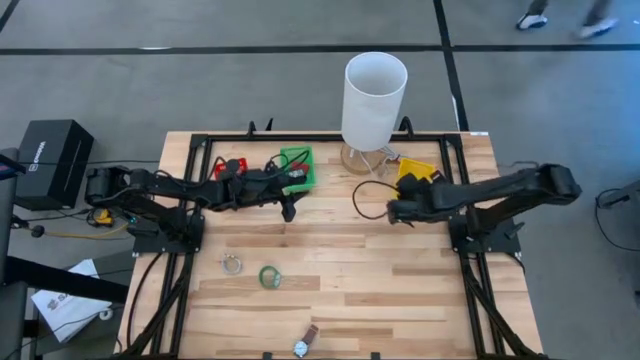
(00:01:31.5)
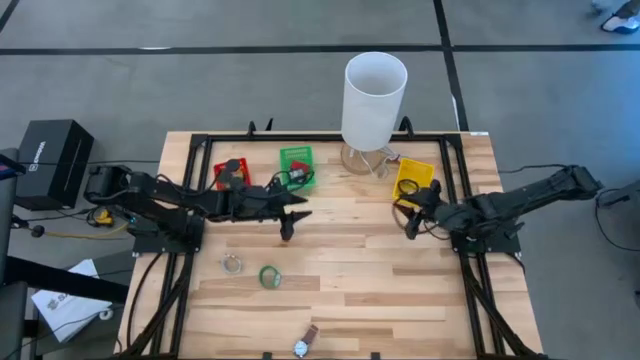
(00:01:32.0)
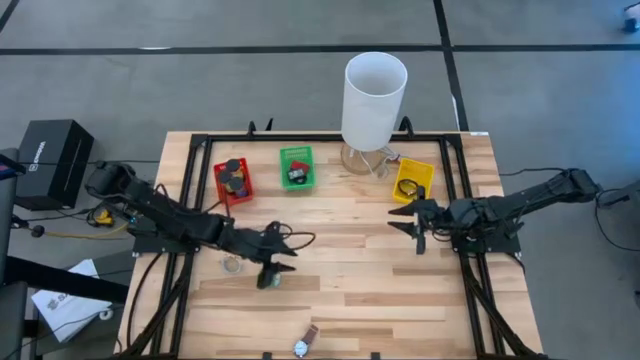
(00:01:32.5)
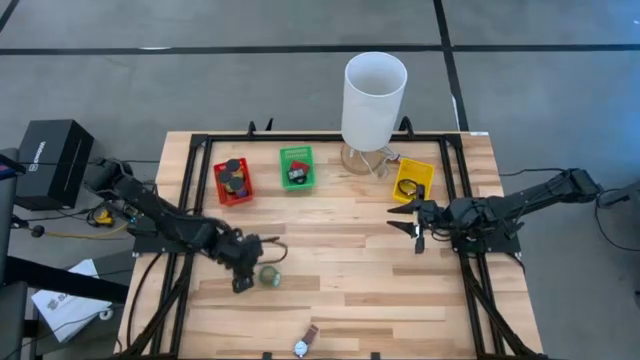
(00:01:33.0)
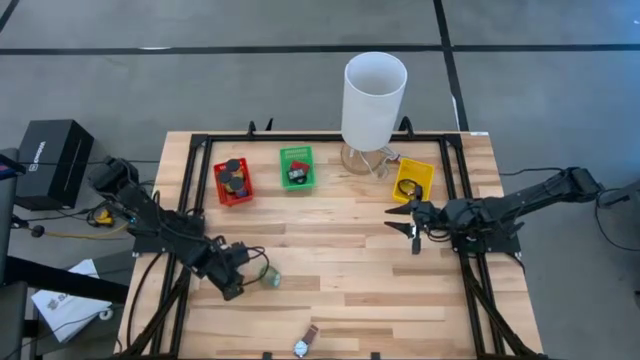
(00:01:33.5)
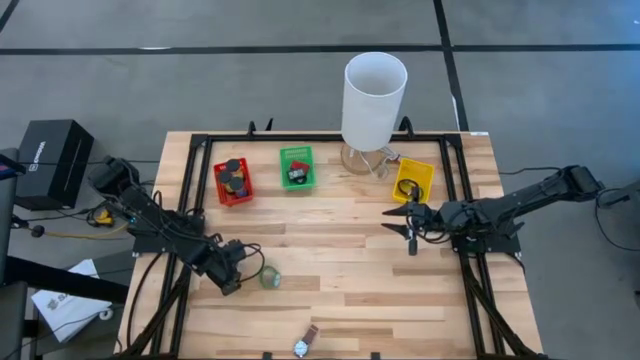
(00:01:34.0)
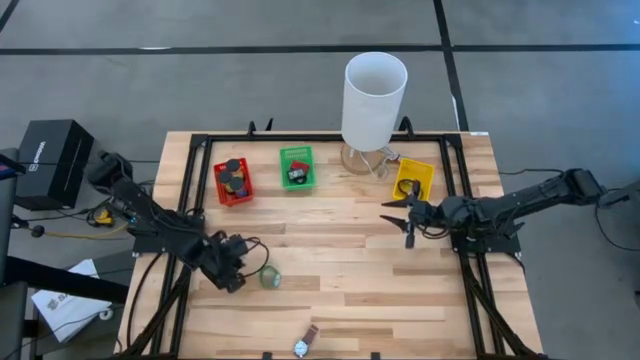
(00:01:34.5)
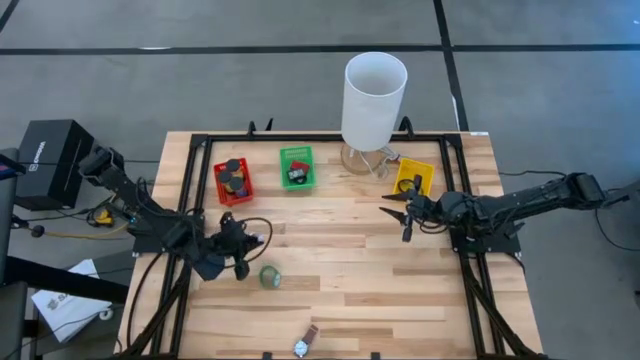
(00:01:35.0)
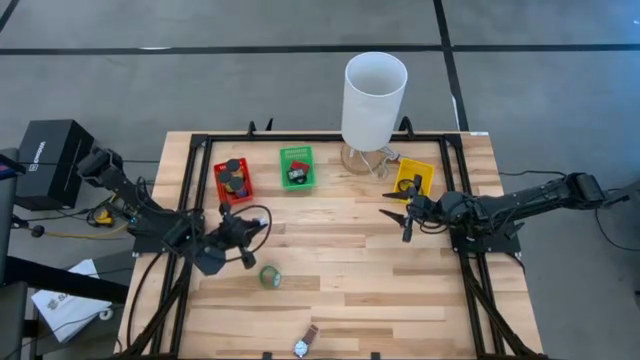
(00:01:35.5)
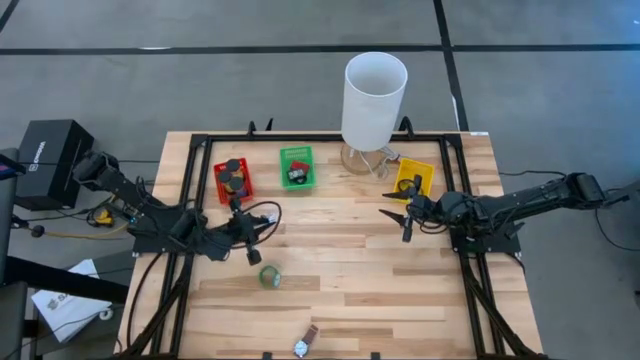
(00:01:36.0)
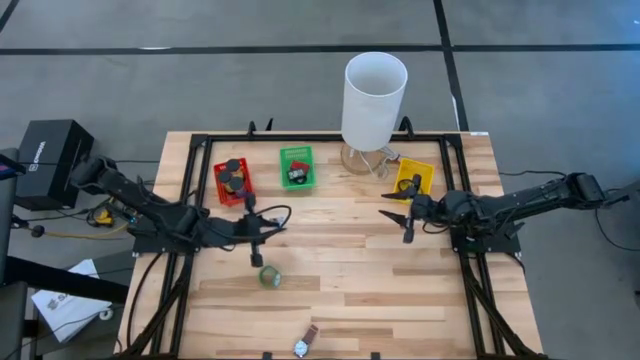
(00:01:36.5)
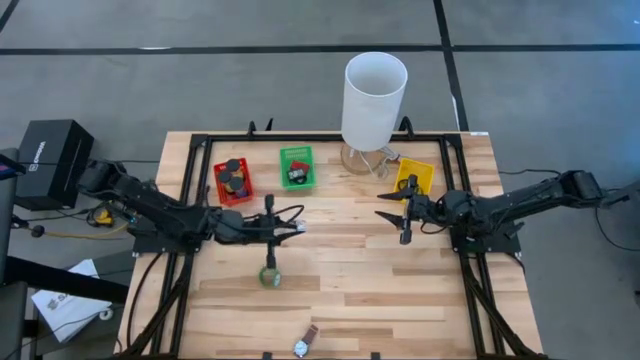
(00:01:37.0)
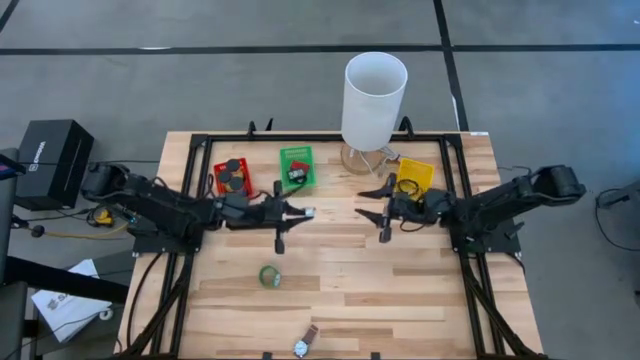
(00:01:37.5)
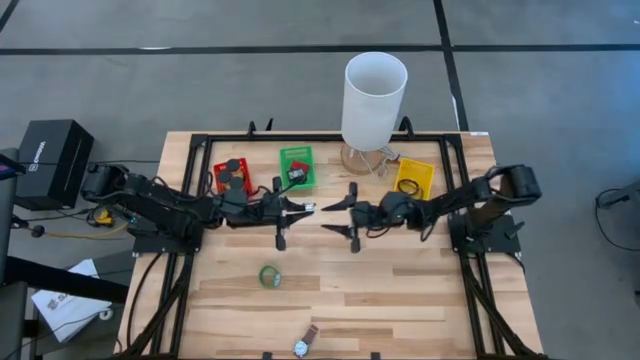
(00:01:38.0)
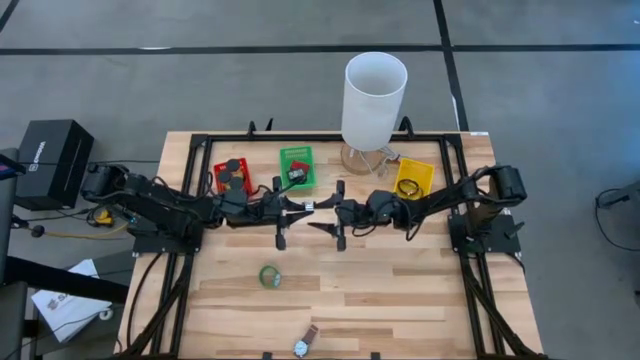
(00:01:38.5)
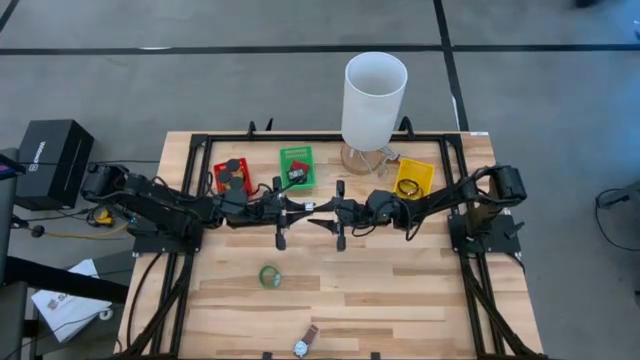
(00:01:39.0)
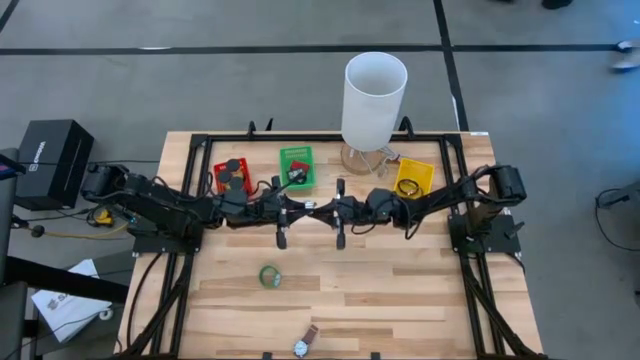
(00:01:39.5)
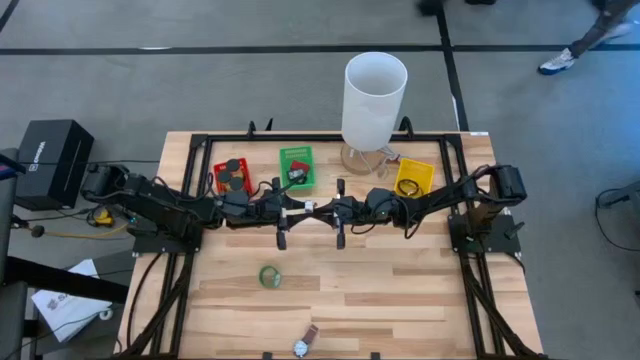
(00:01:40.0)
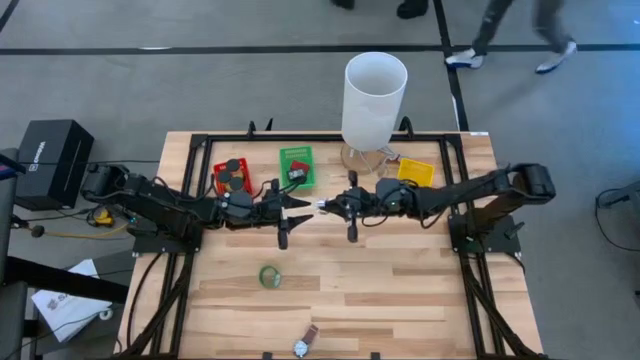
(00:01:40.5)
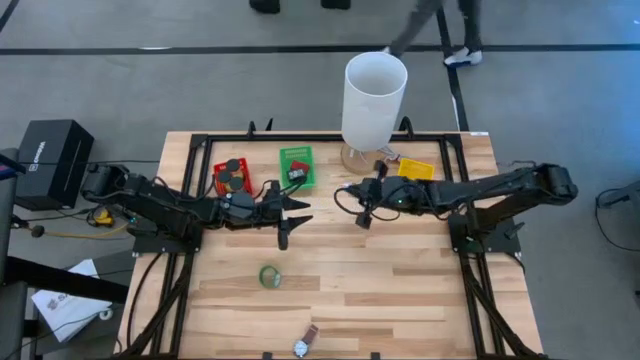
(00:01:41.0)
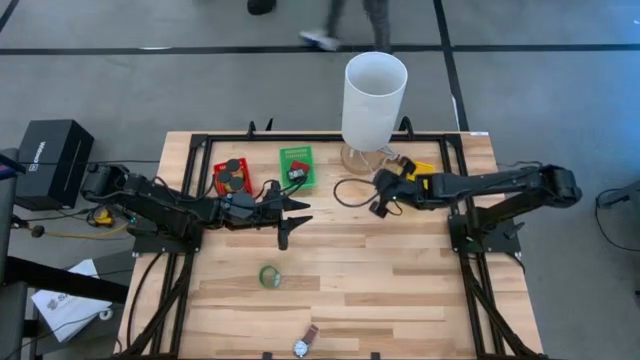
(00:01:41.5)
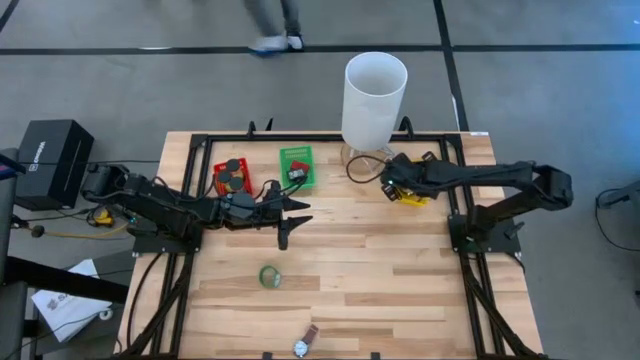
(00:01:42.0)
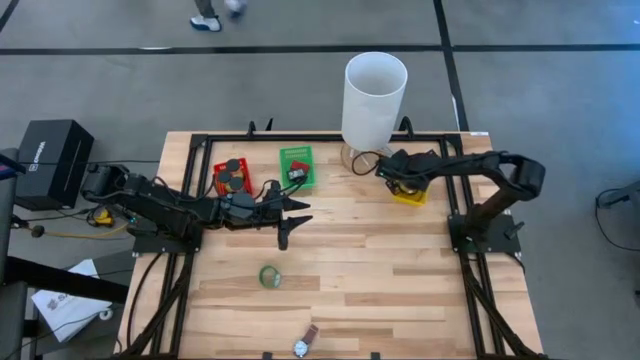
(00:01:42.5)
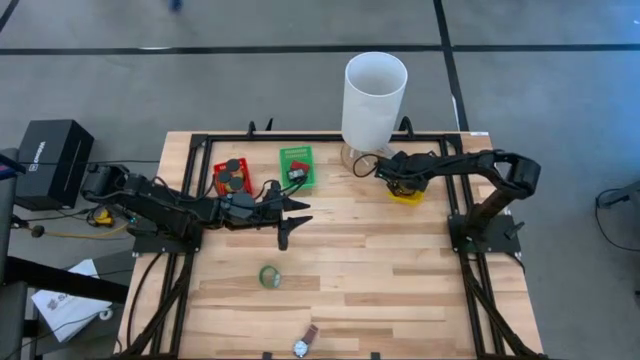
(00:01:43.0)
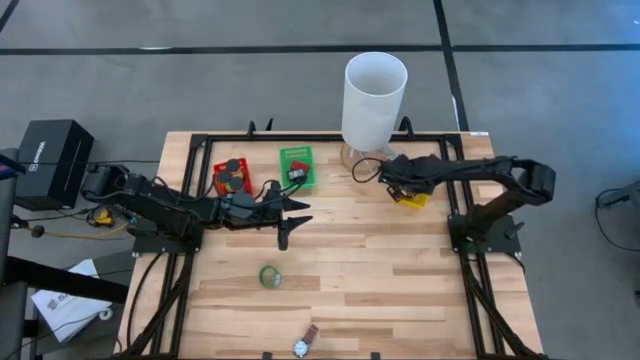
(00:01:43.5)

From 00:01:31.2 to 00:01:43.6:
Task: Pick & Place Office items
Put the light blue wrist watch into the yellow bin

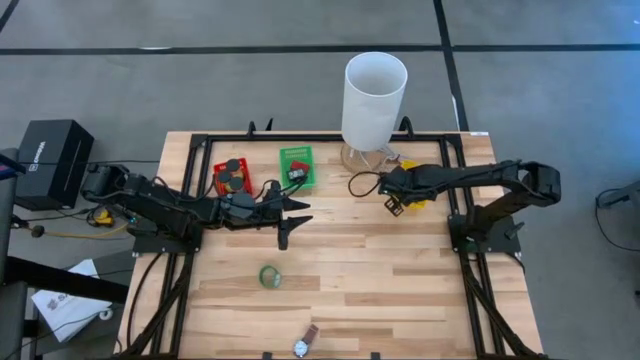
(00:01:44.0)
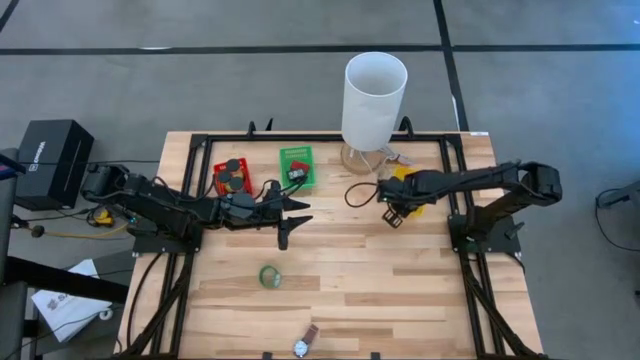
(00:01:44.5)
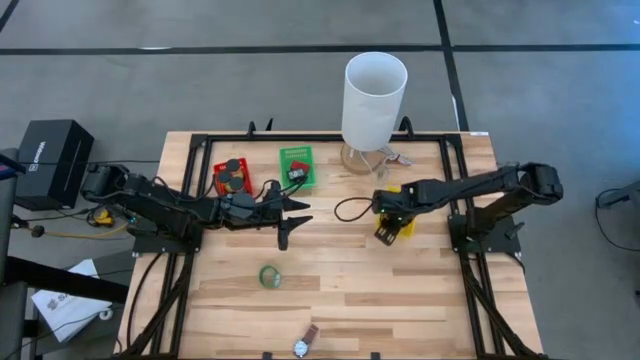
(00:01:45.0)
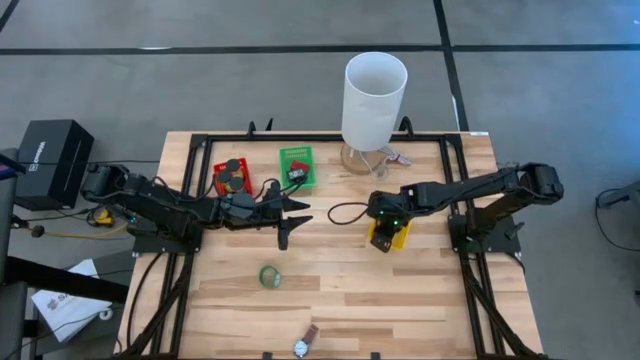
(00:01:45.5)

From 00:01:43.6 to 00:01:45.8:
Adjust the yellow bin

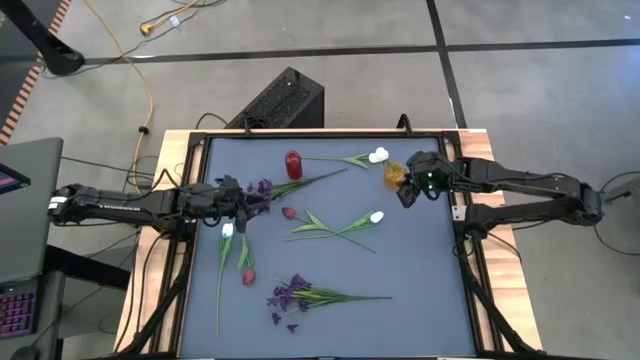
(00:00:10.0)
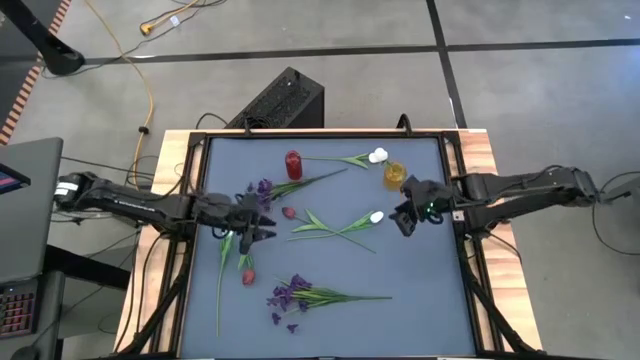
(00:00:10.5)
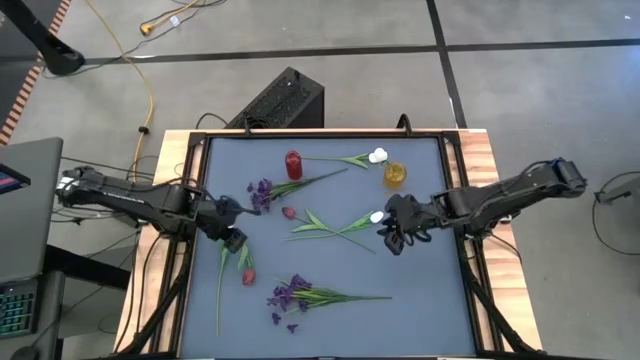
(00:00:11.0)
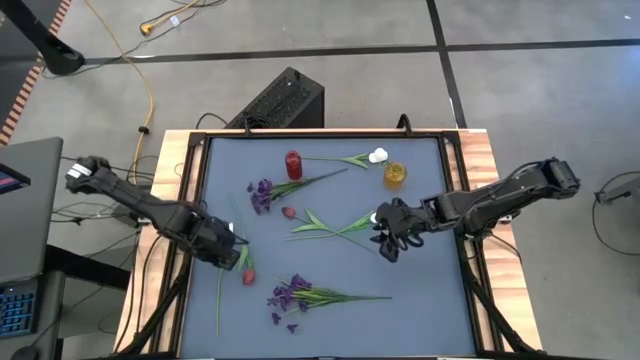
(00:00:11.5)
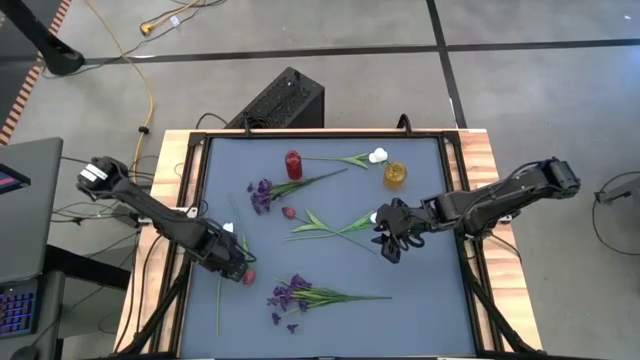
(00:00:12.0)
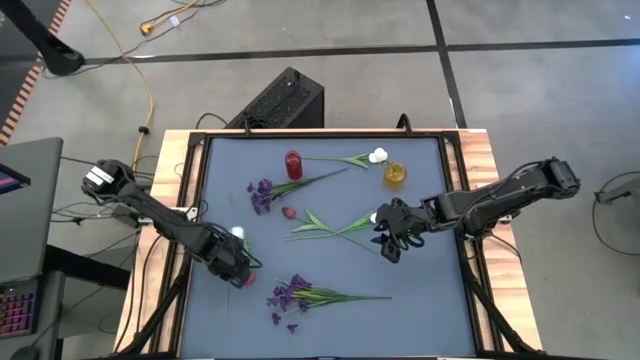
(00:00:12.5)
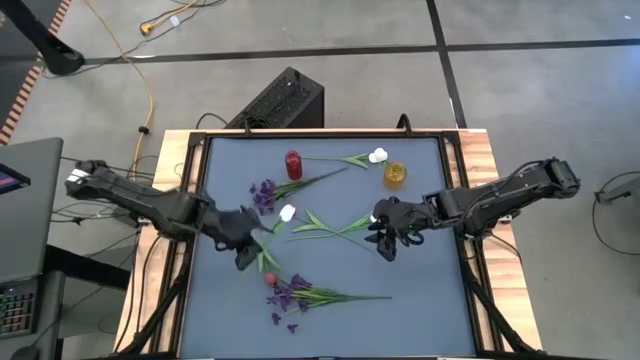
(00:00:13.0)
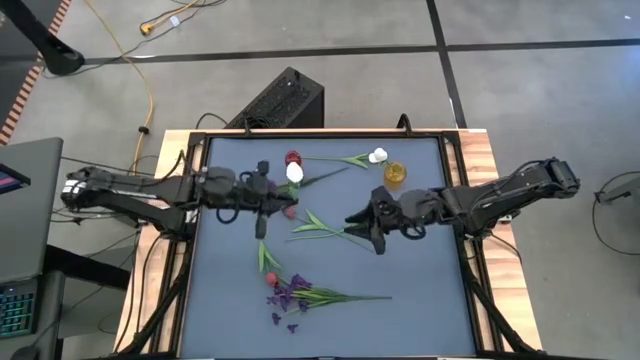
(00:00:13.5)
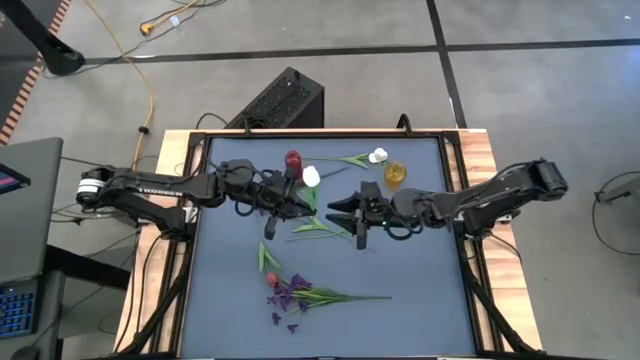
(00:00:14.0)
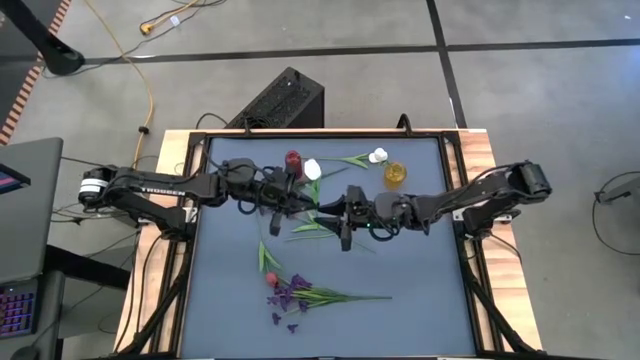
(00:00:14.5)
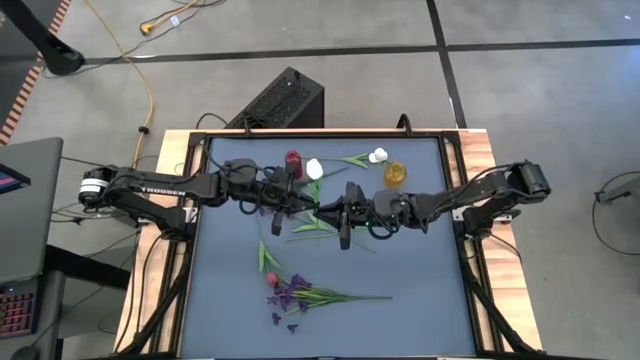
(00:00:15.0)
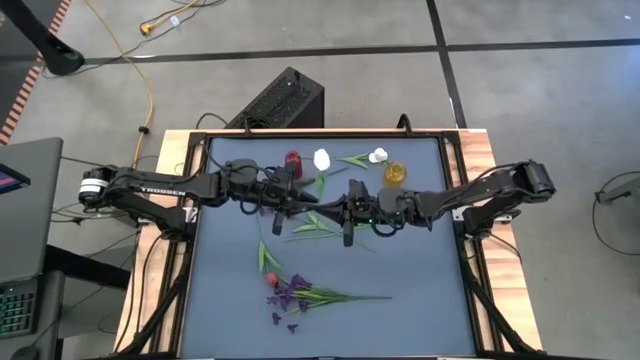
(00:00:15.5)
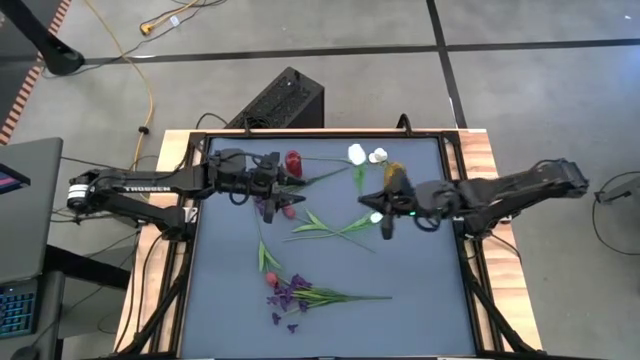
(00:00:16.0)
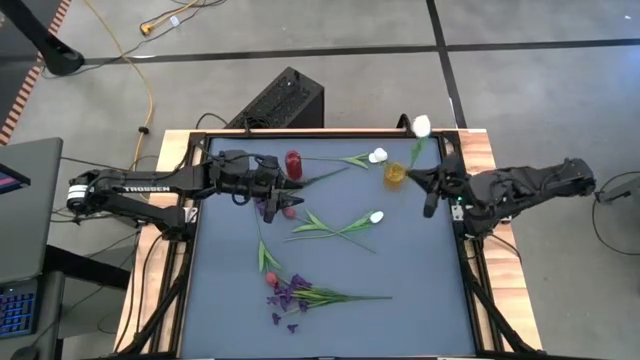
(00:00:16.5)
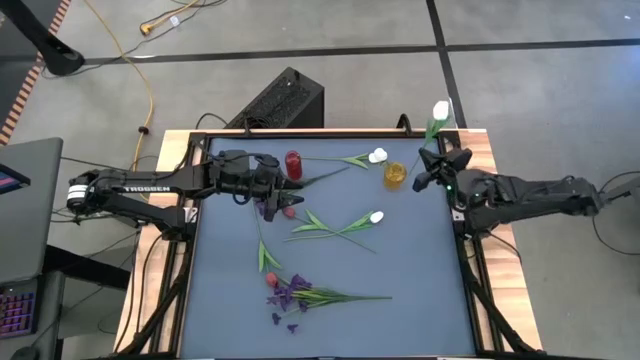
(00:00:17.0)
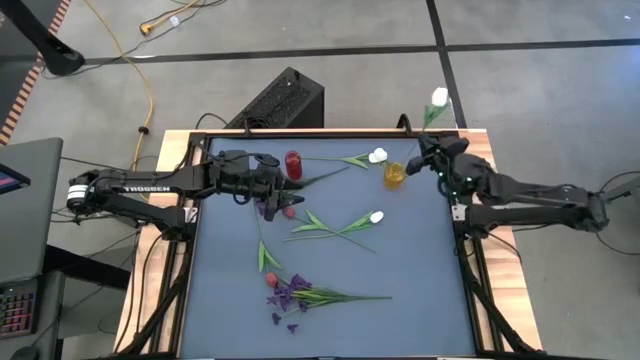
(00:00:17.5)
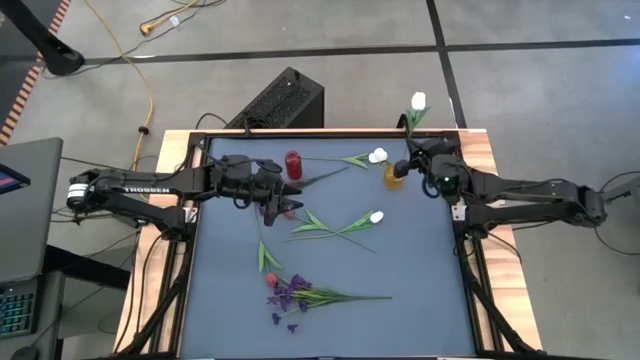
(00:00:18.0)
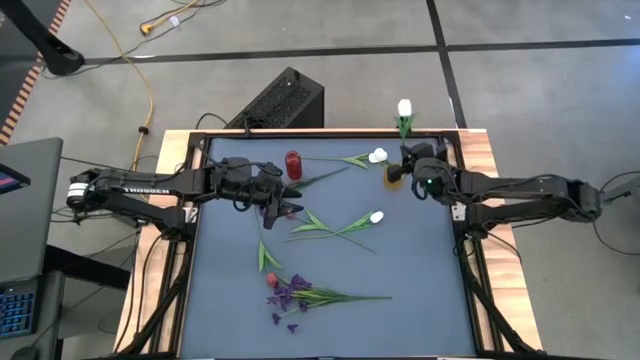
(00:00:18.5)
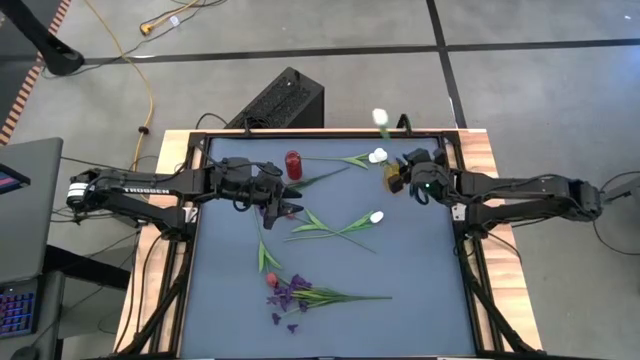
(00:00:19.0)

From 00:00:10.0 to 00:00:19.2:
Task: Sort flowers into vase by color
Put the white flower into the yellow vase
